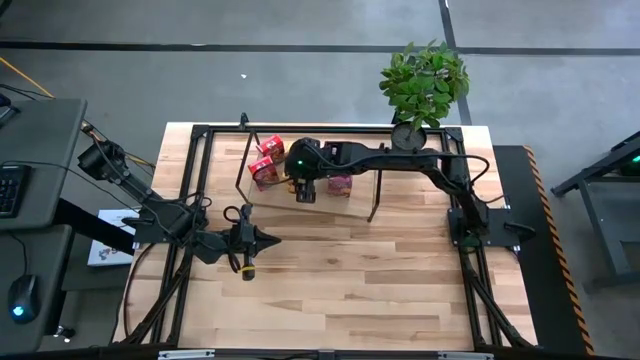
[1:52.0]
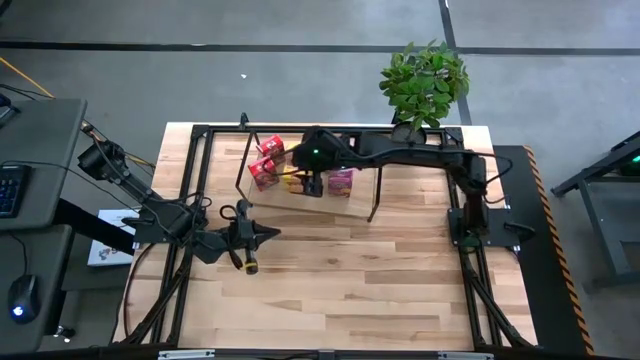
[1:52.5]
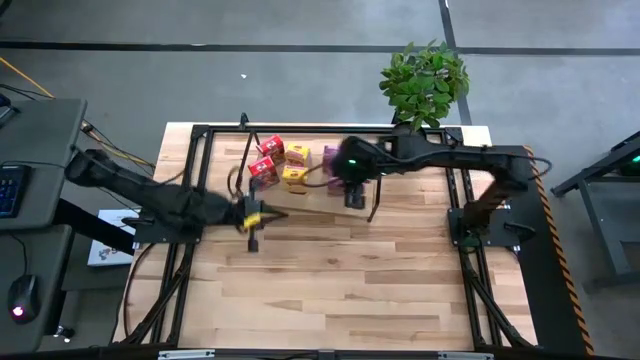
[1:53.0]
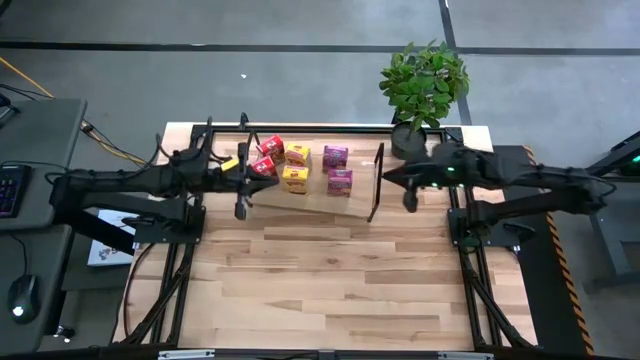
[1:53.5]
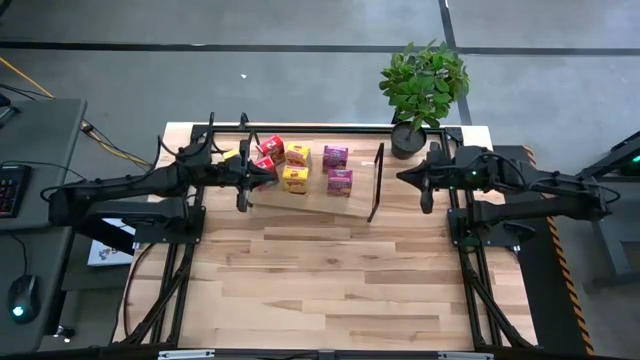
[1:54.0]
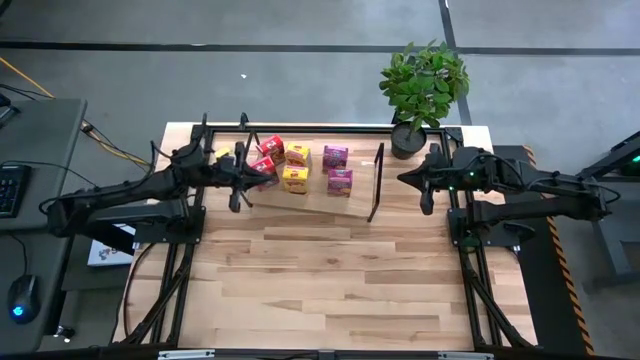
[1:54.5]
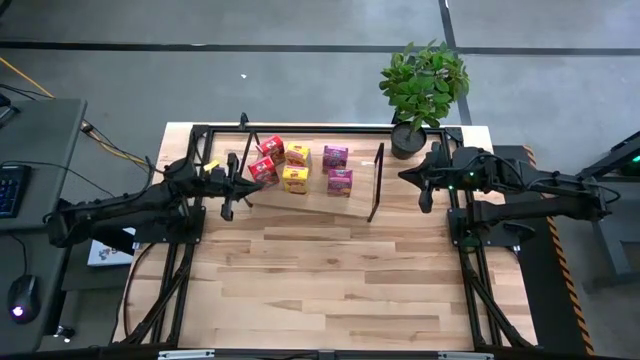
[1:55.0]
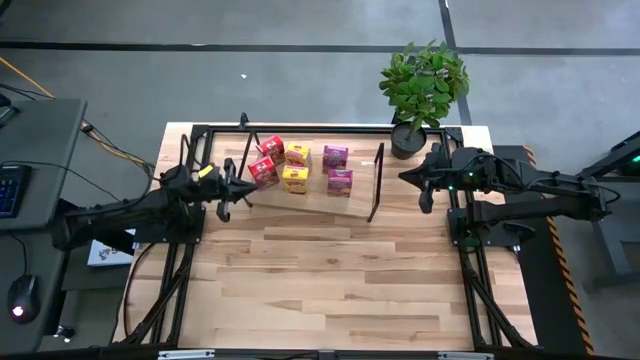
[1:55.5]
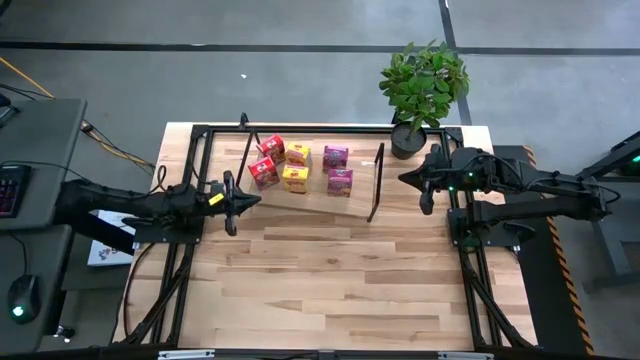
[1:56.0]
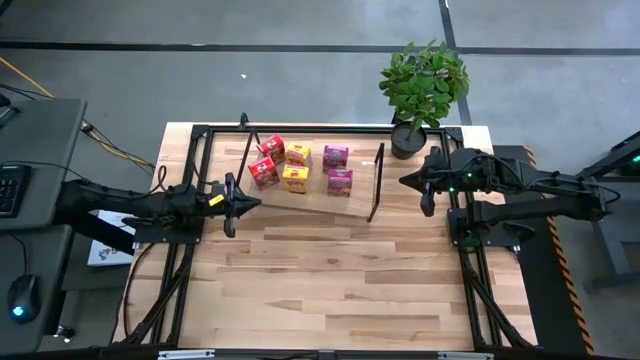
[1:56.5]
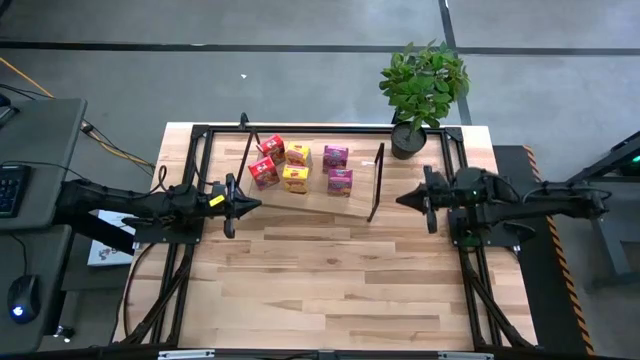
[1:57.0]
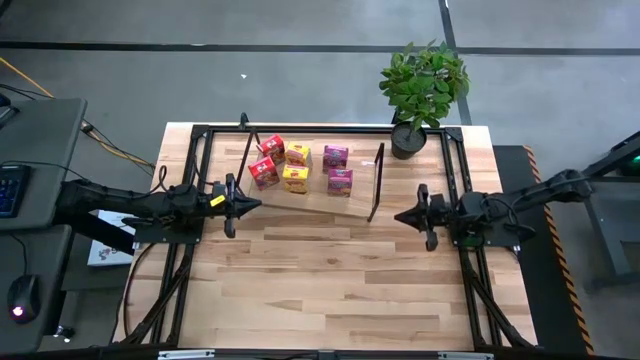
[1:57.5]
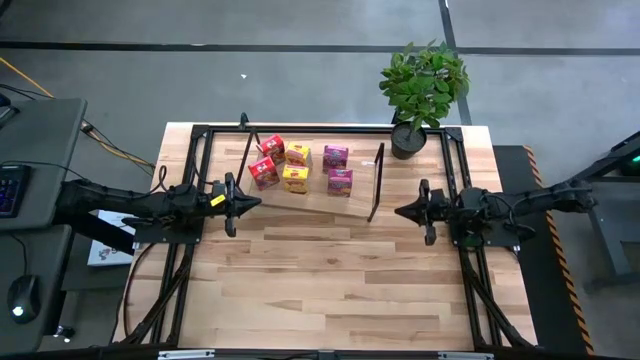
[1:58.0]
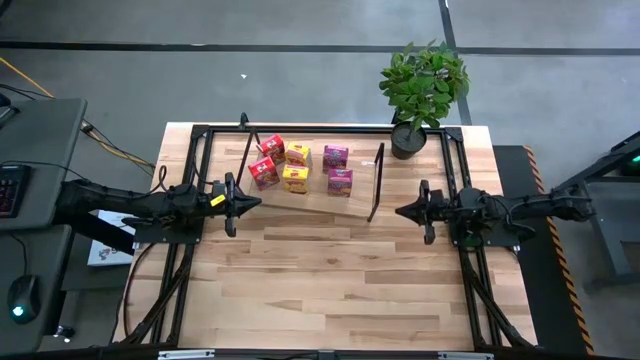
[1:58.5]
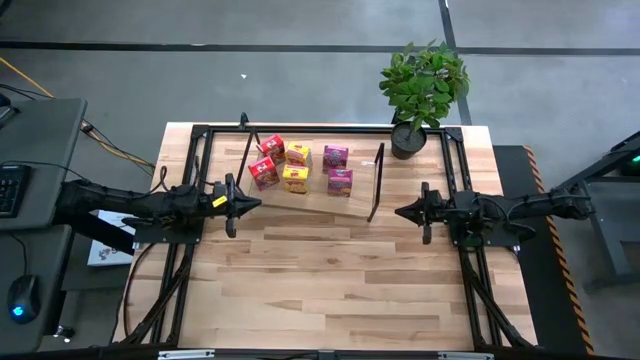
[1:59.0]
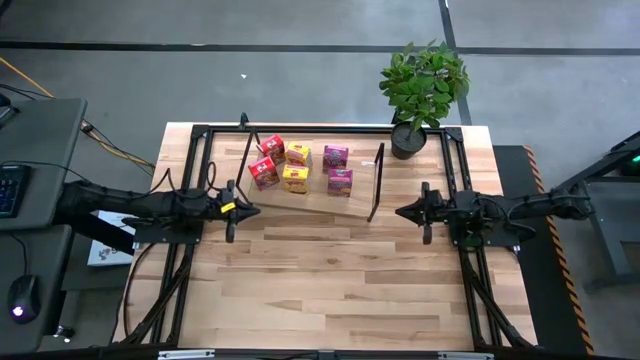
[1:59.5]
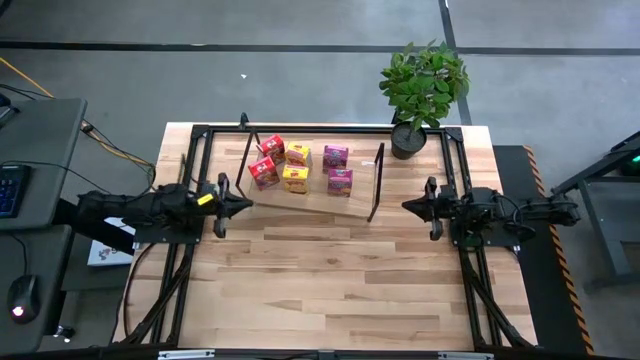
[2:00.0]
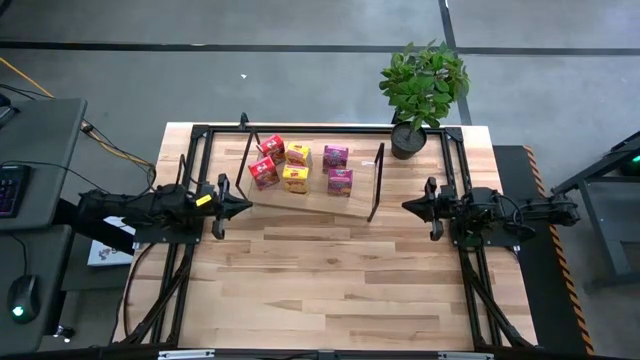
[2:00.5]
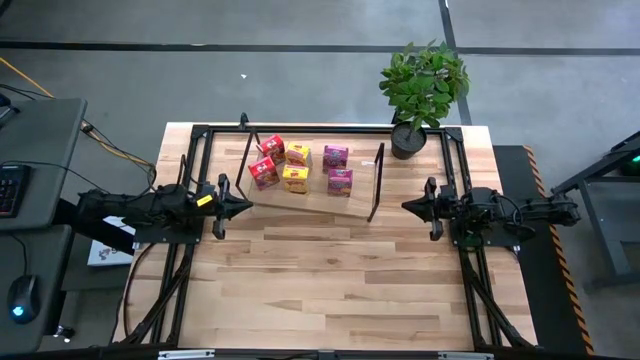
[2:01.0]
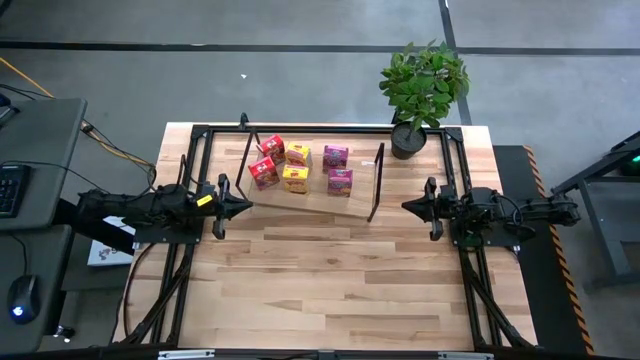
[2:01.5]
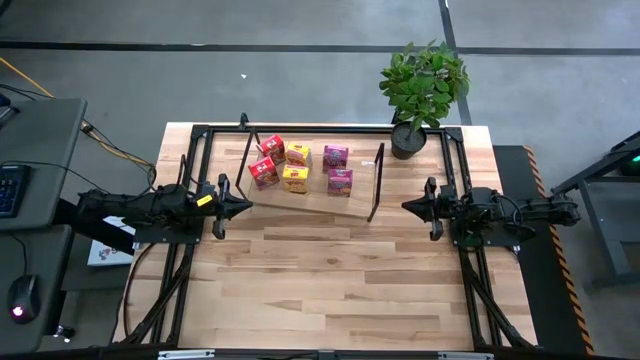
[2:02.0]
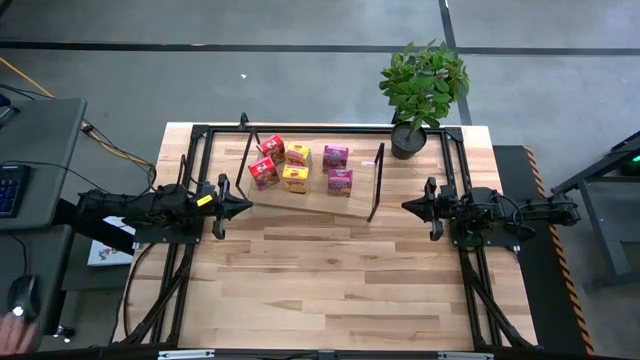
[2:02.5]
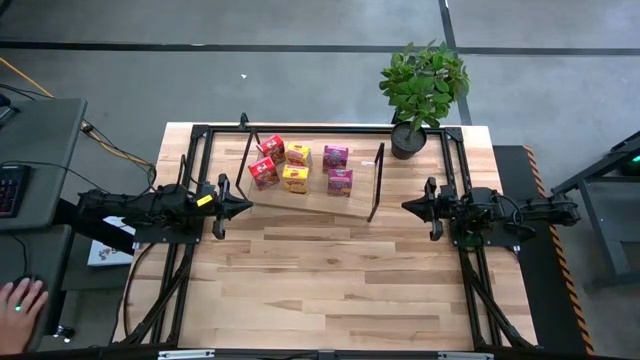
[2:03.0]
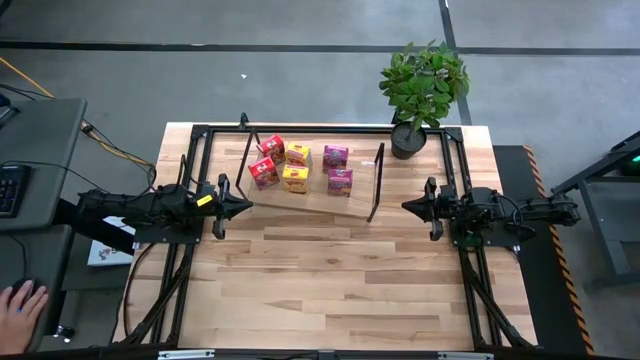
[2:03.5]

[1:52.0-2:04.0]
Task: Stack cereal on shelf
Return to Home Position

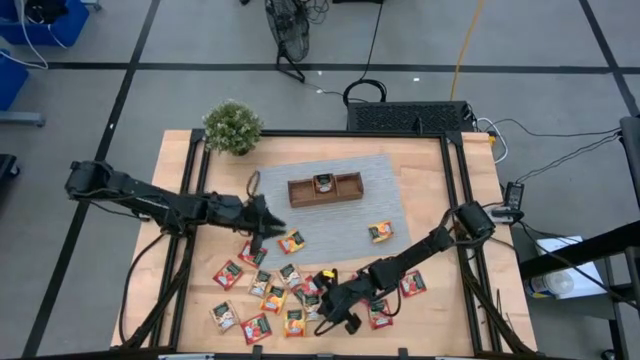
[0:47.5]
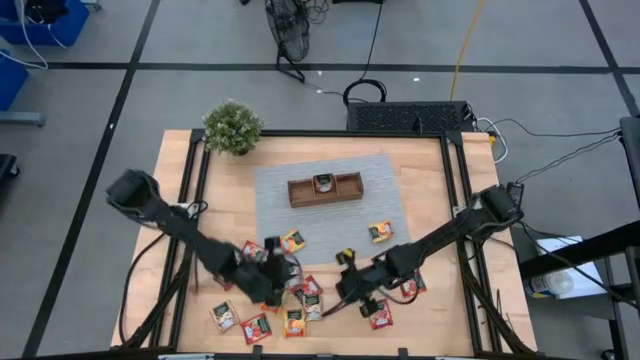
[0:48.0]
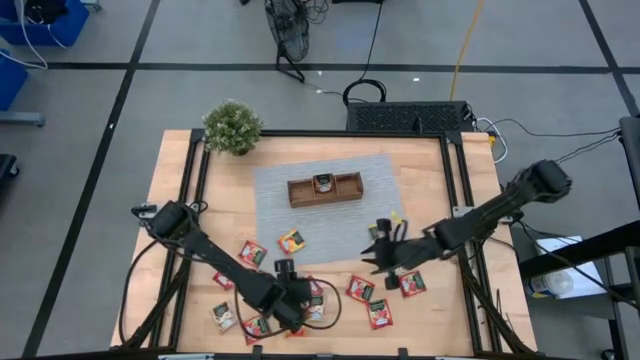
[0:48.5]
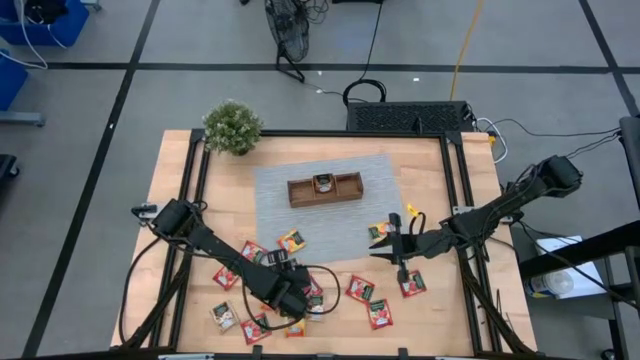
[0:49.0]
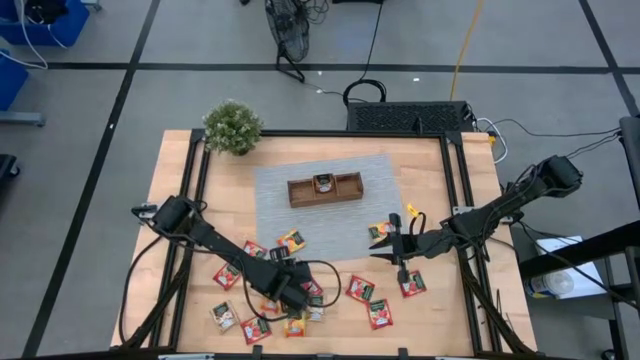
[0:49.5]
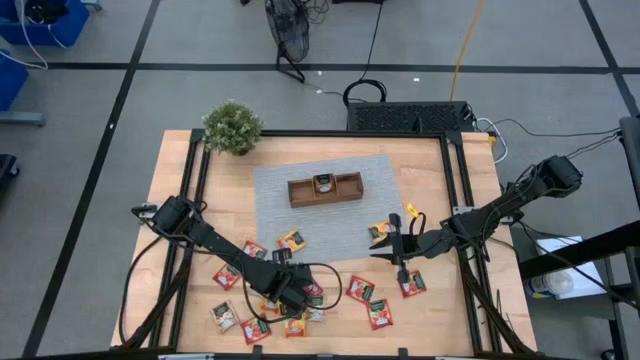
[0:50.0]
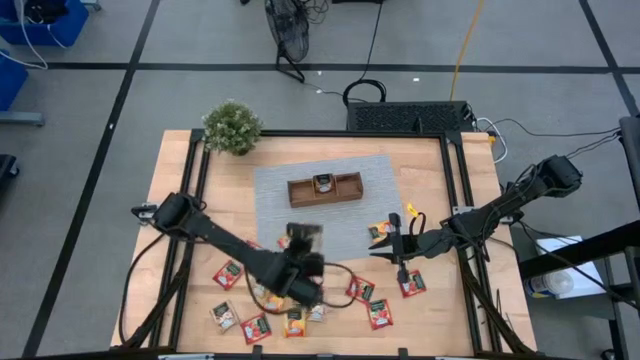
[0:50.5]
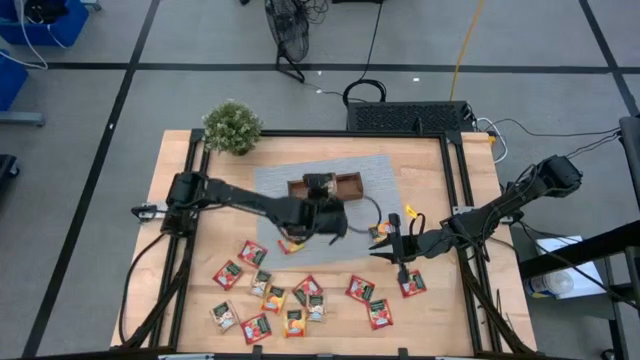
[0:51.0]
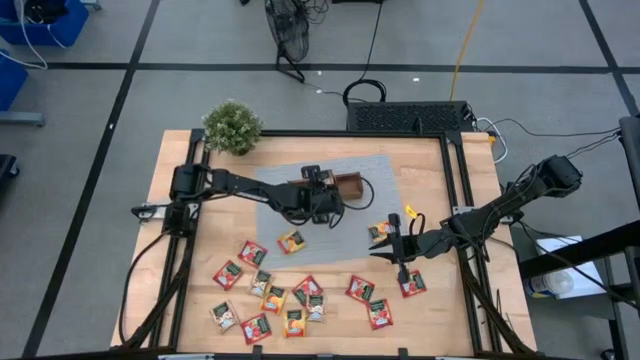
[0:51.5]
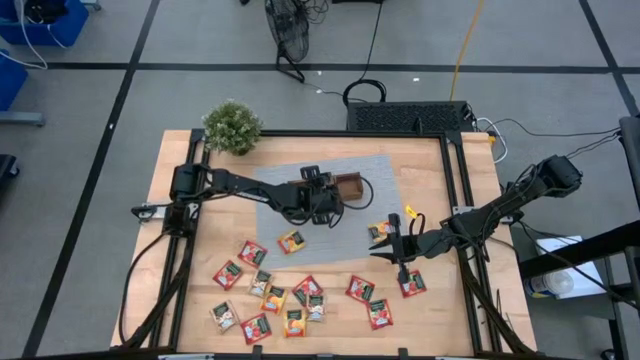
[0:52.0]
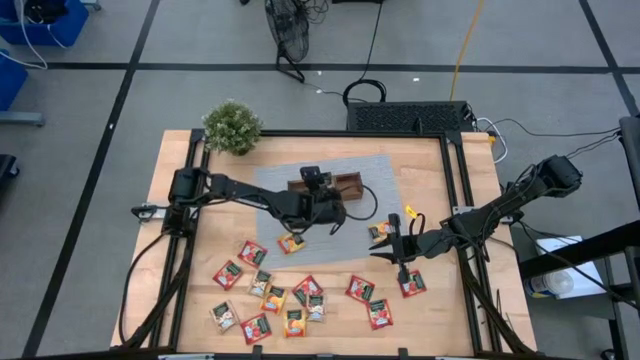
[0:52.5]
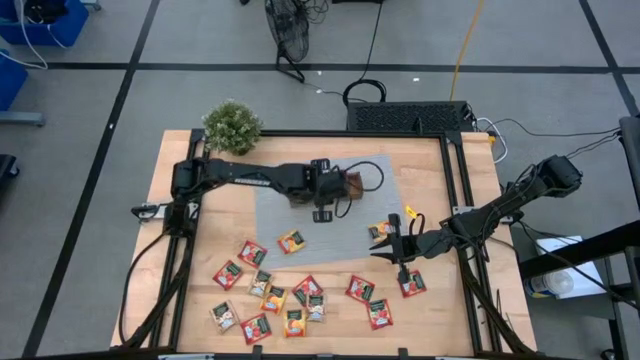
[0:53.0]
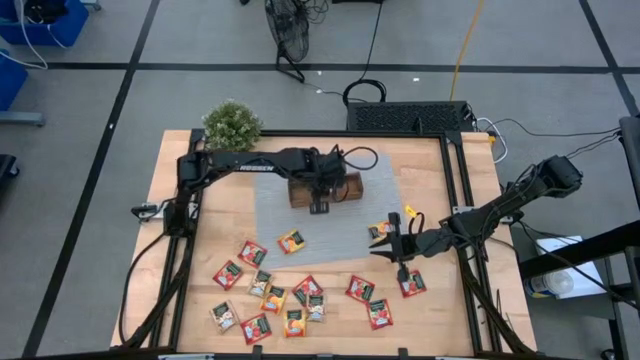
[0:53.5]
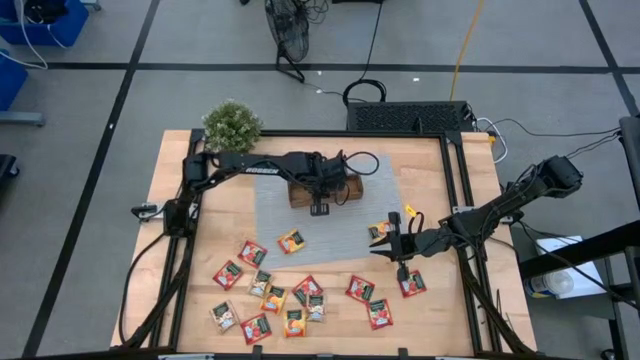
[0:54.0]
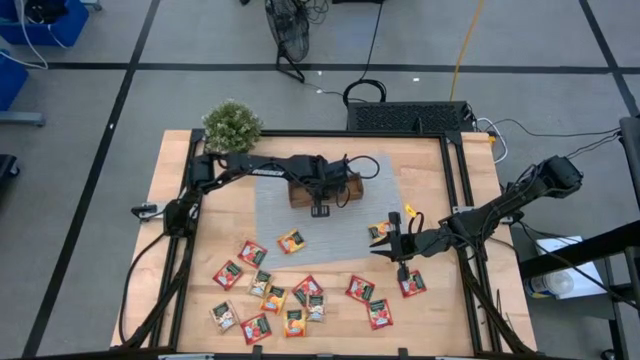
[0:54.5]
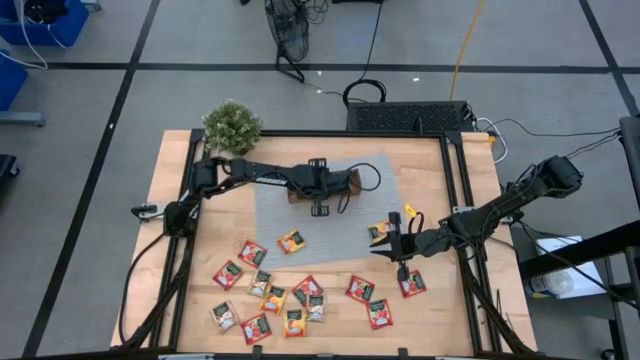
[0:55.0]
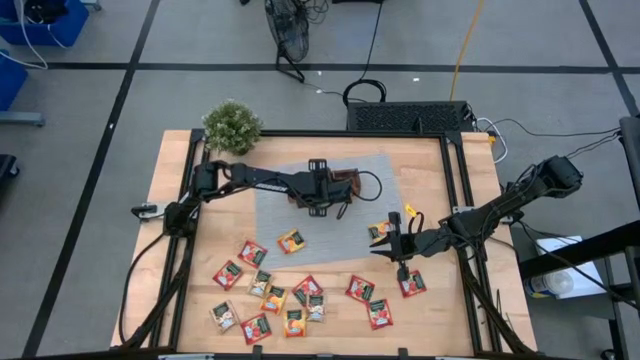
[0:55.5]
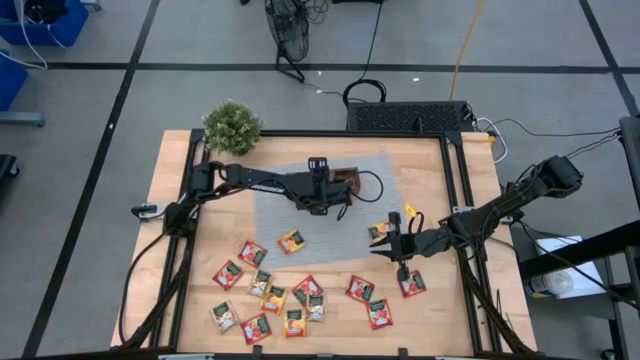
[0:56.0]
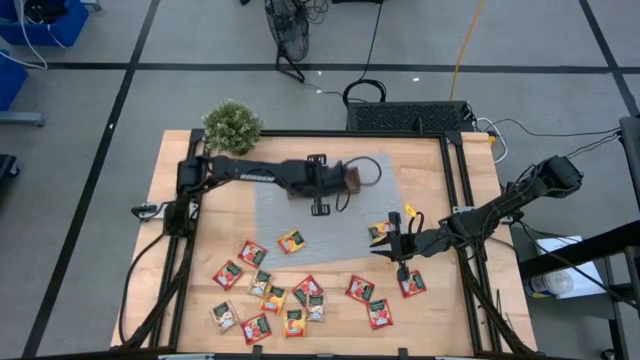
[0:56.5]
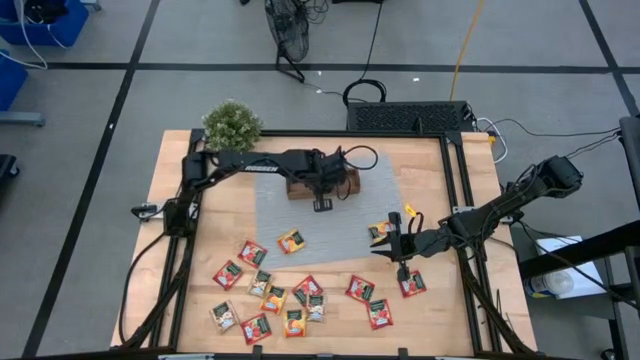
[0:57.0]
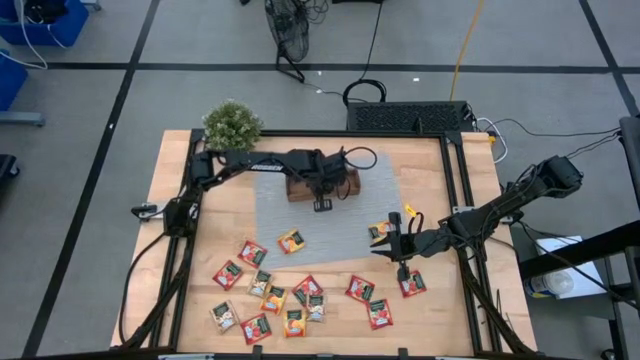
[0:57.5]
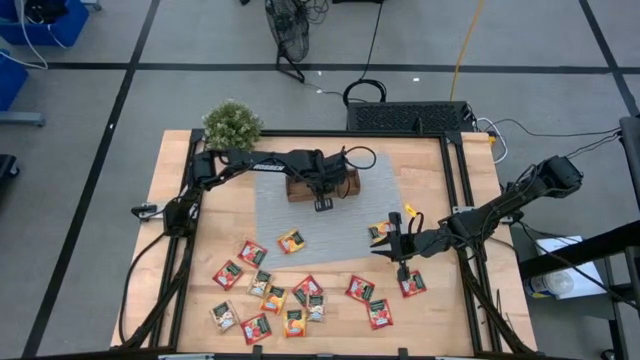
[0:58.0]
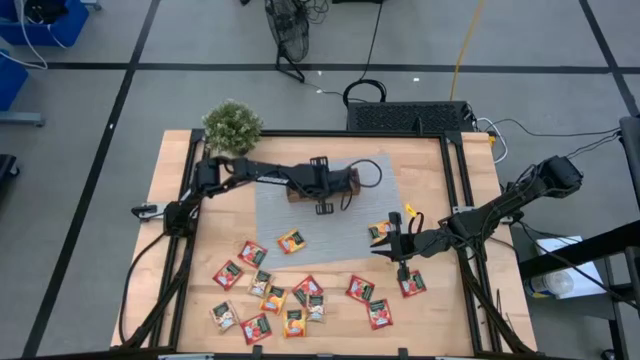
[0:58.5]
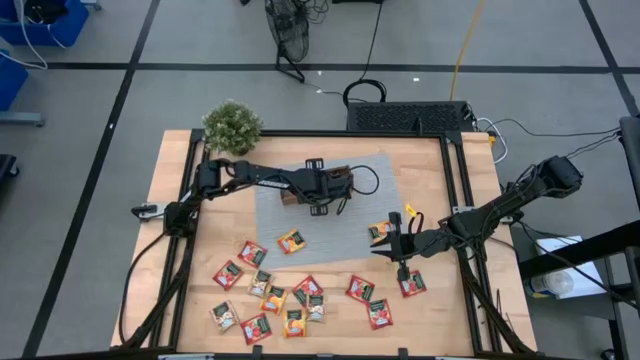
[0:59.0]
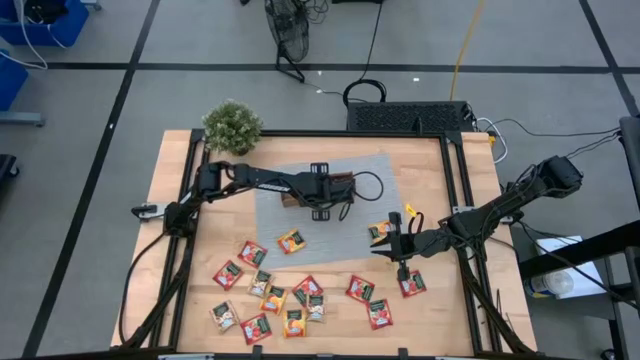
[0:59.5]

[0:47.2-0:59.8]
Task: Pick & Place Tea
Put the brown tea bag into the middle section of the wooden organizer
